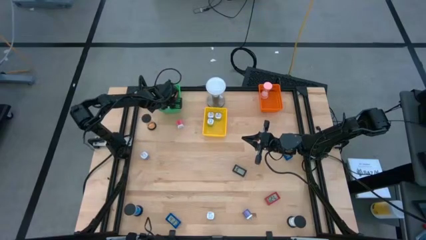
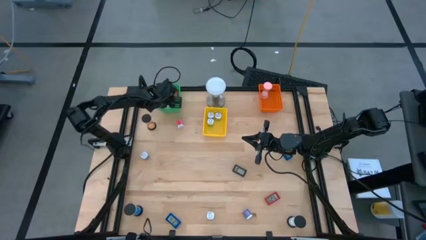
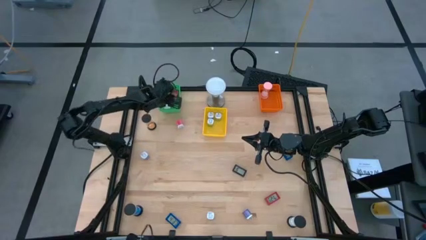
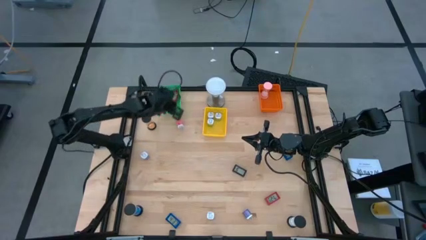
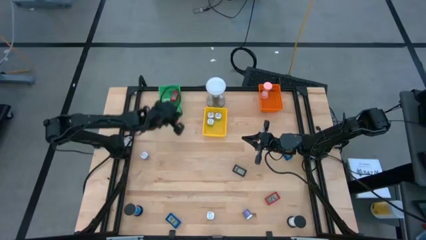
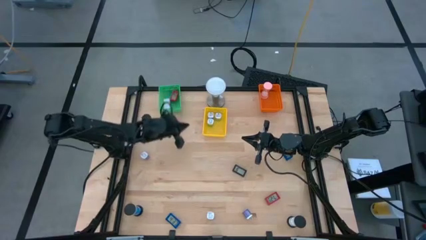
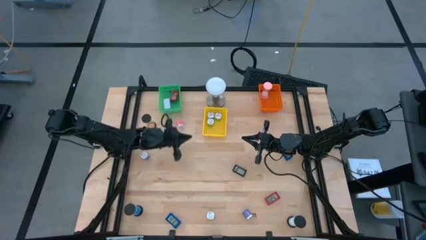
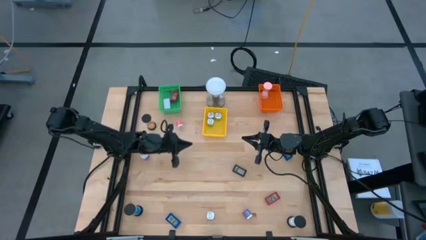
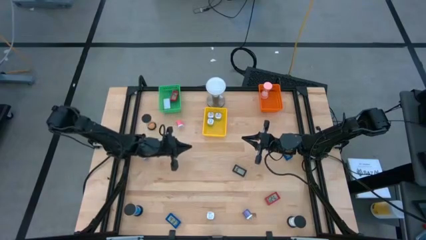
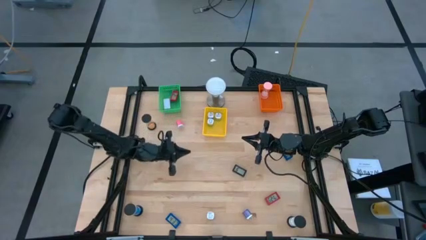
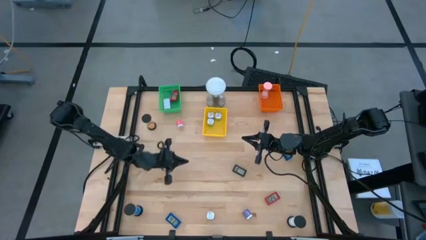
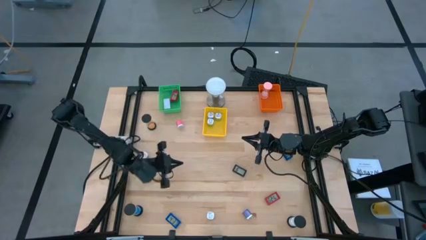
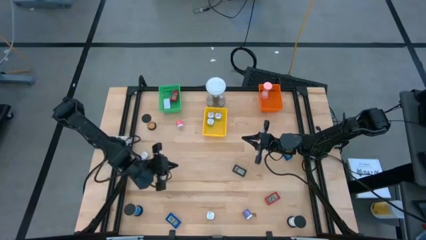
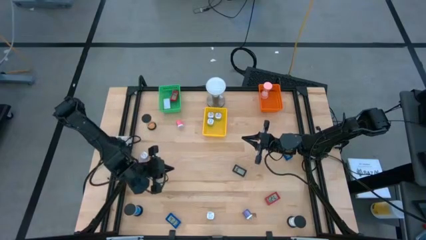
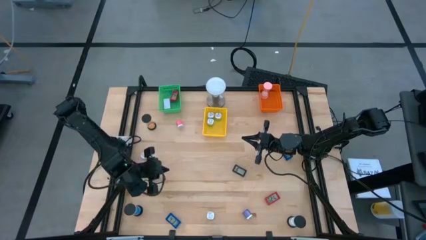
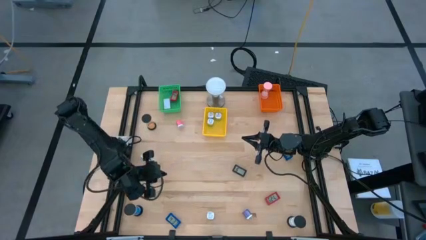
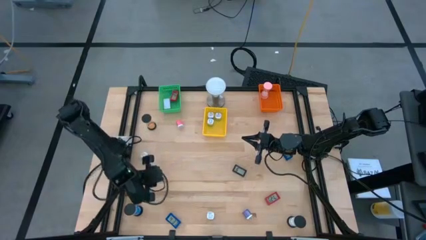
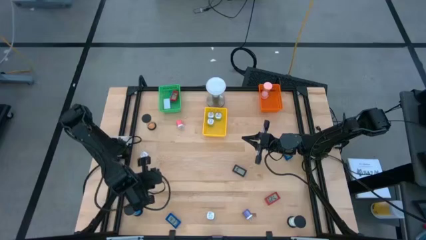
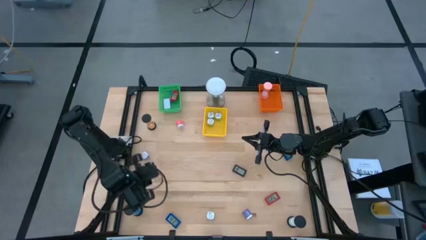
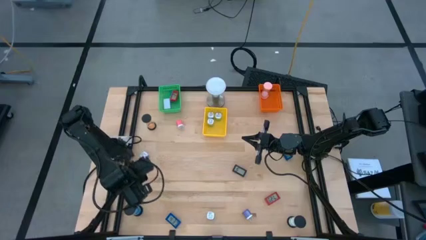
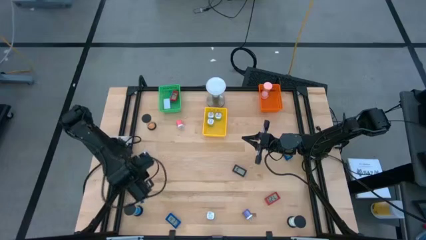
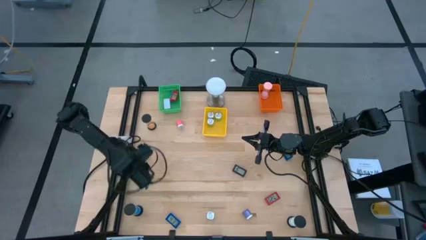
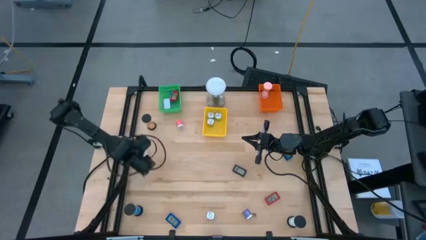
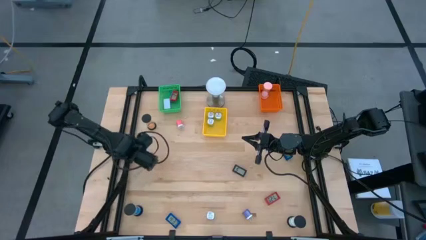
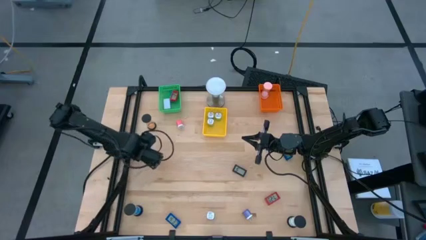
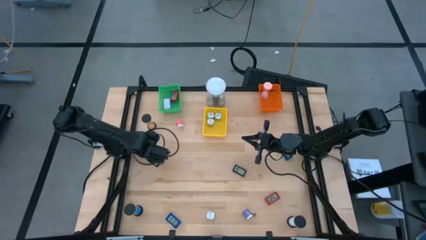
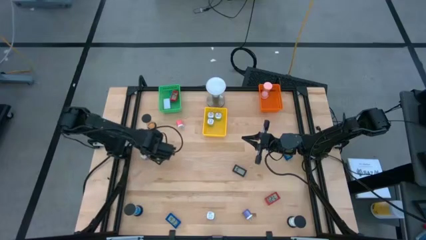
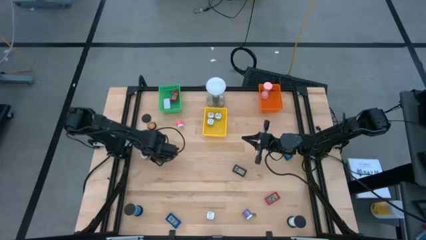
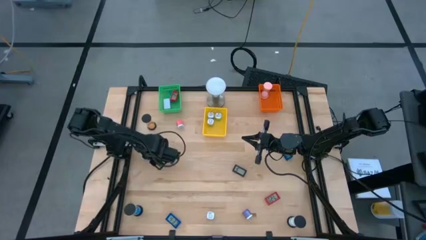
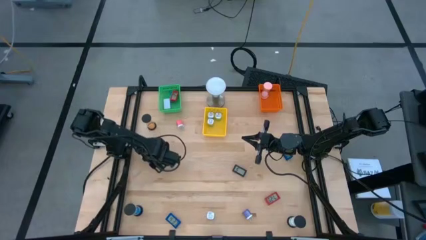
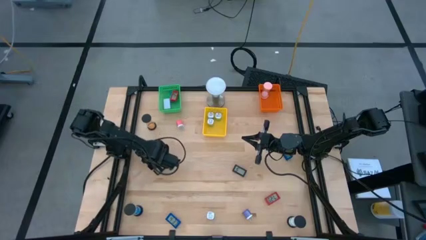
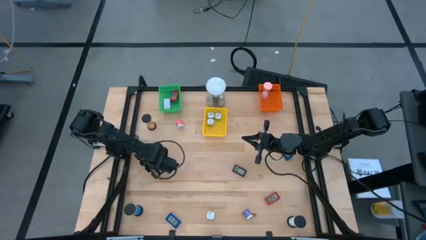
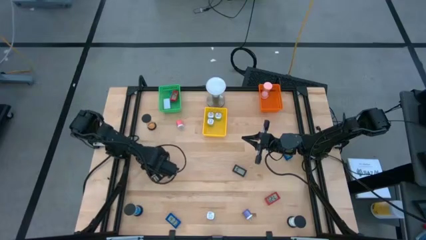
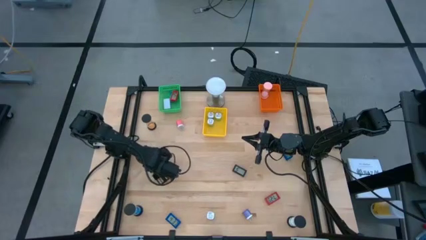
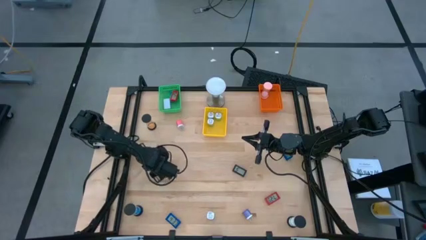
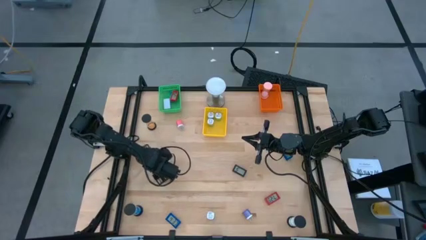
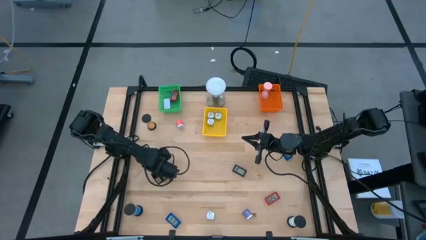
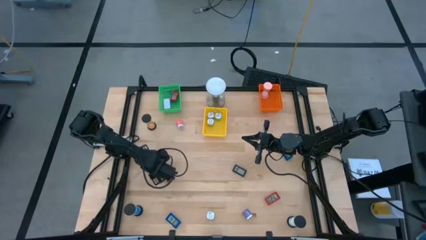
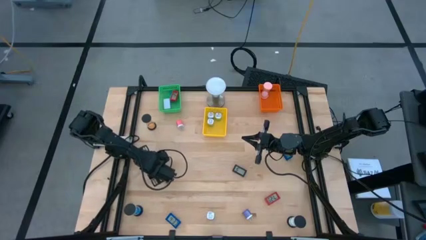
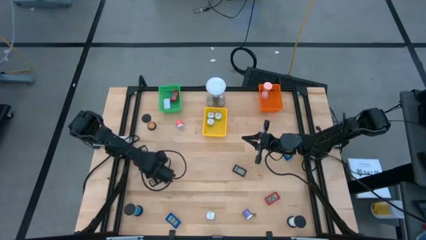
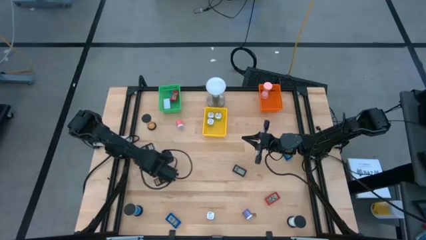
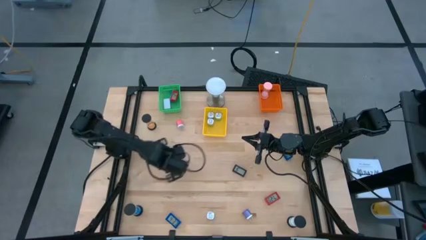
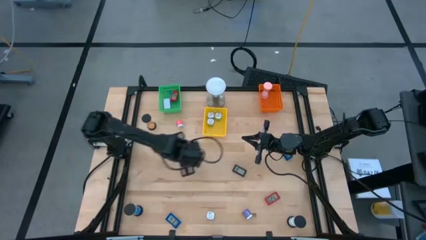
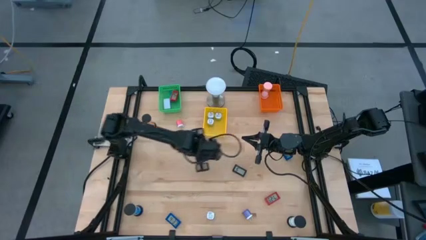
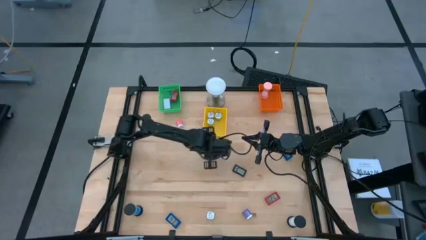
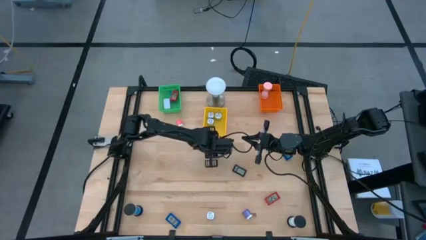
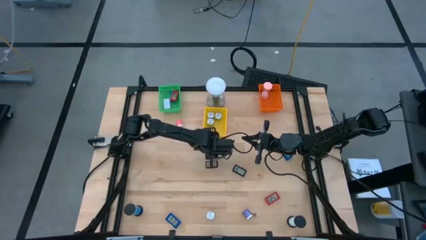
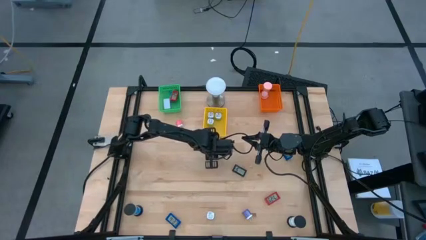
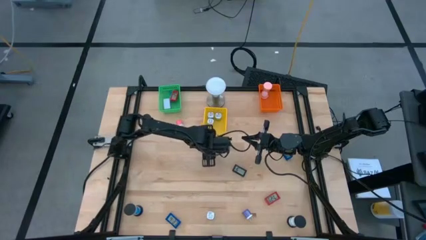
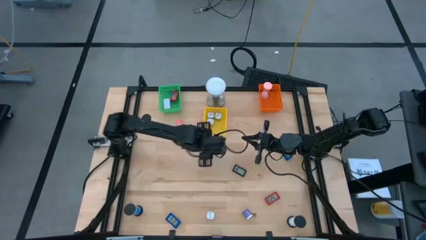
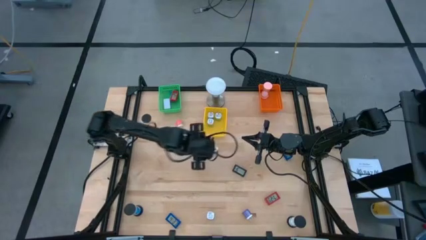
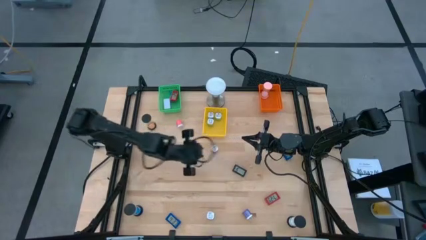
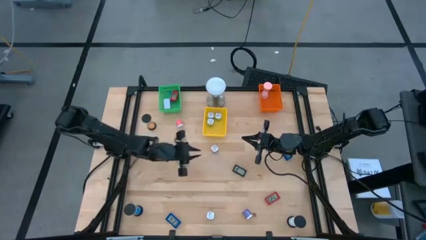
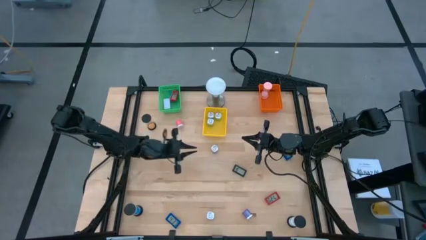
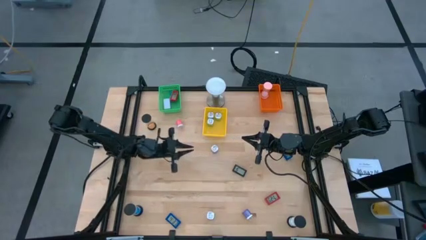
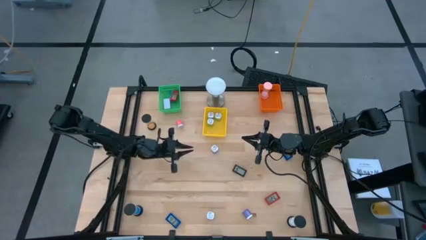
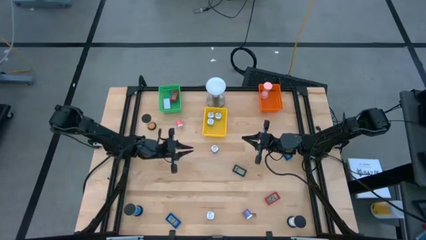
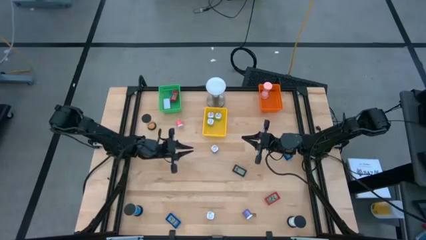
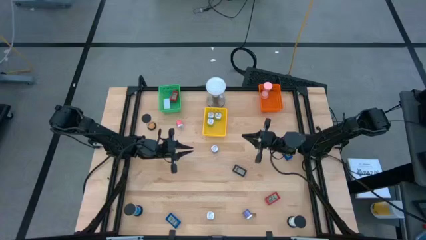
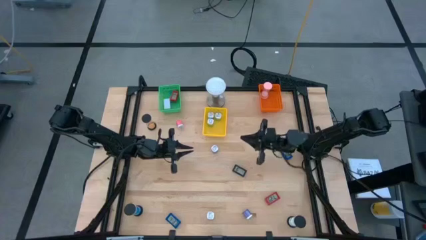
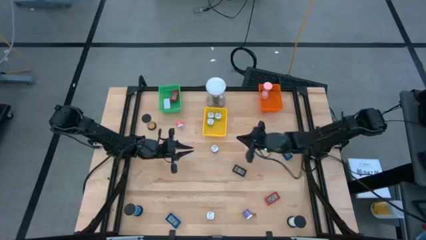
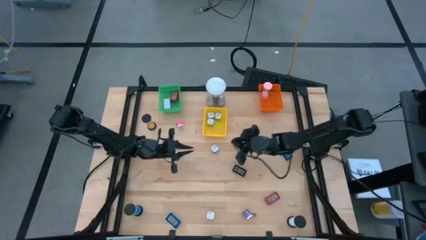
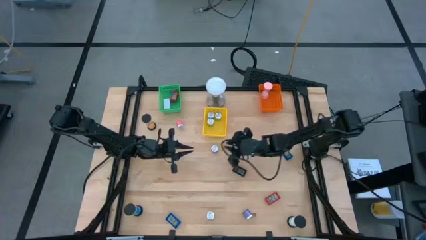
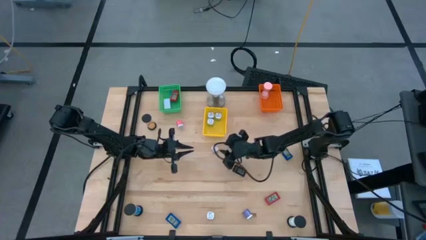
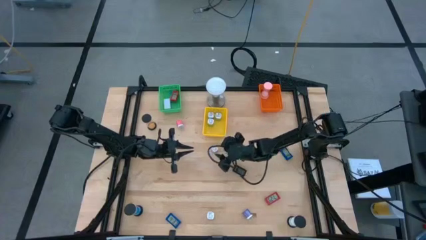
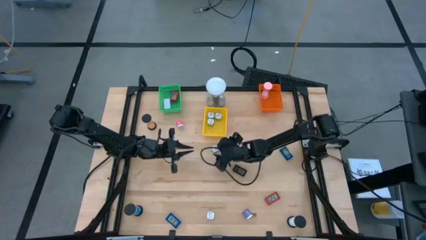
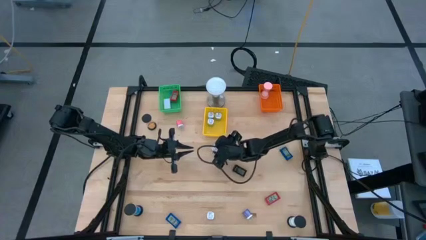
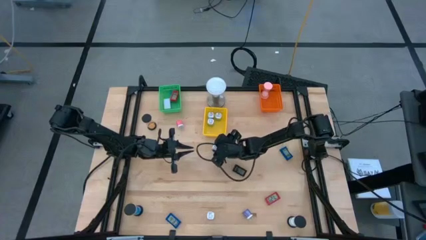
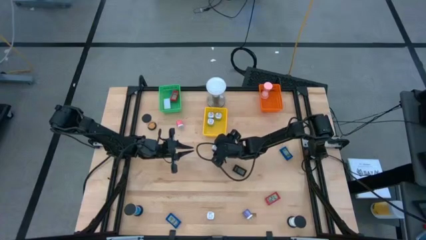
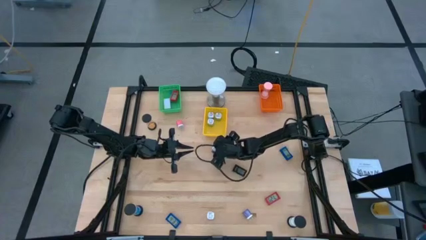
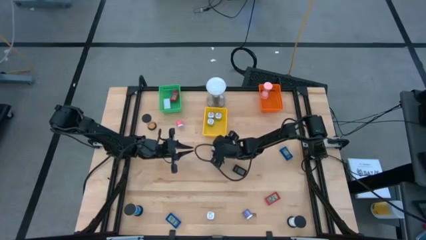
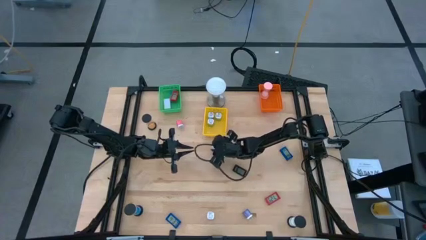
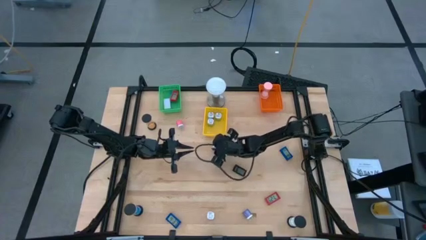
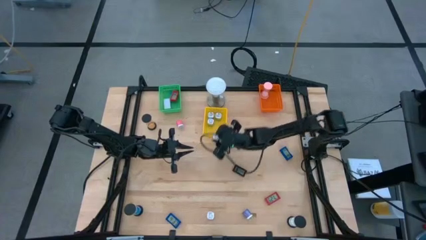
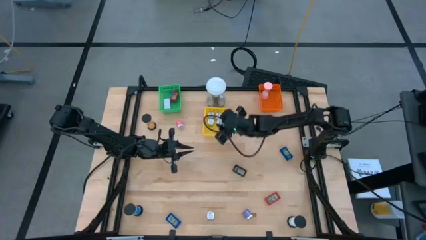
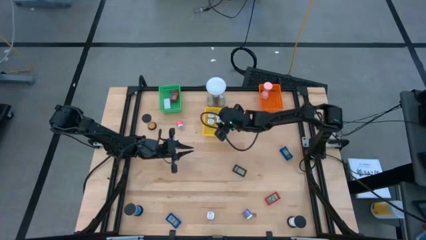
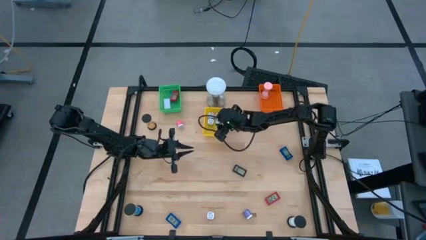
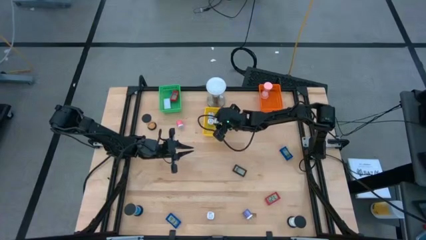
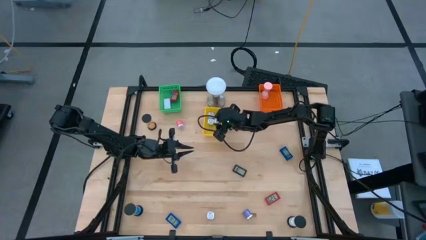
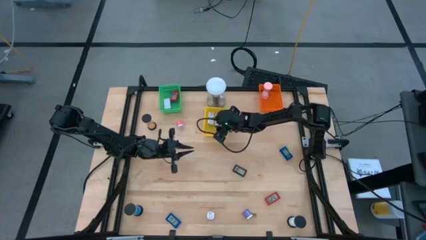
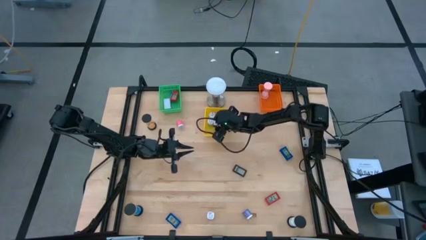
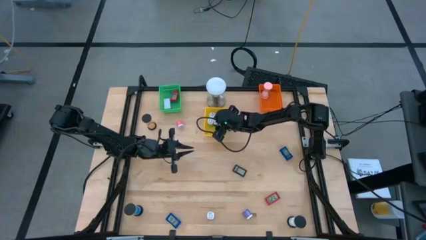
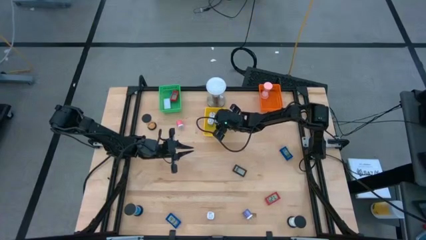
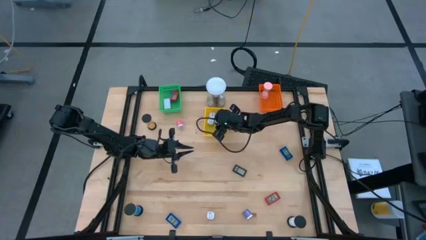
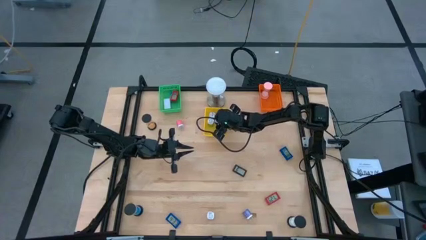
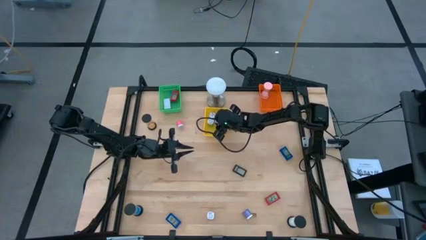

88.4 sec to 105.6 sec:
Task: Pick & Place Office items
Put the top left purple charger adapter into the yellow bin

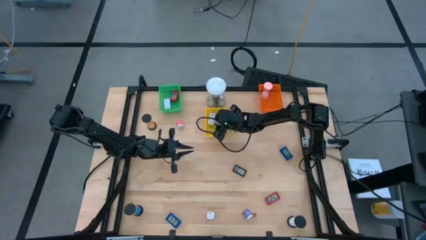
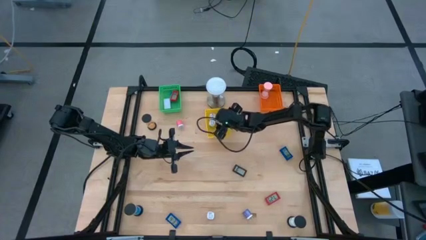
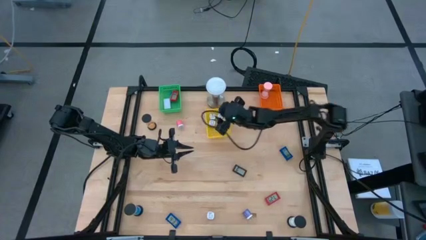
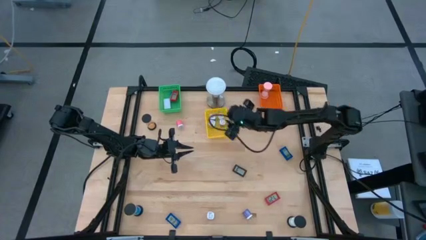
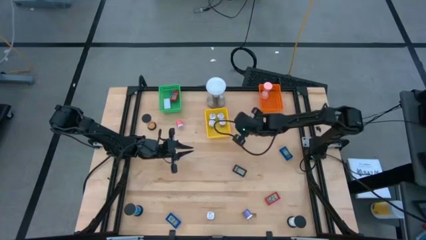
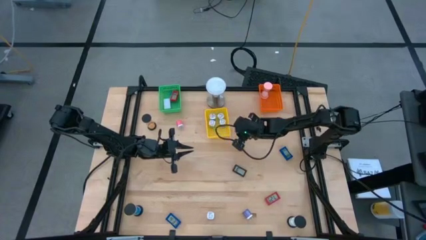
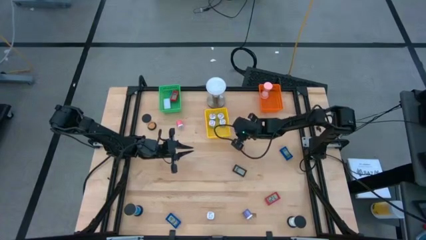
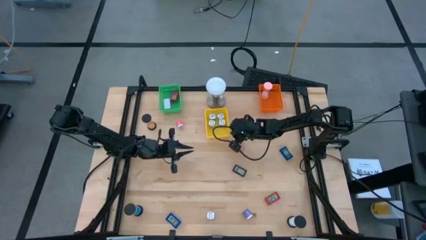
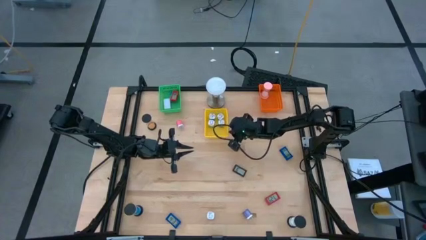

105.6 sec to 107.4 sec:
Adjust the yellow bin
